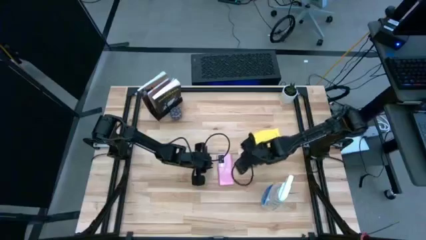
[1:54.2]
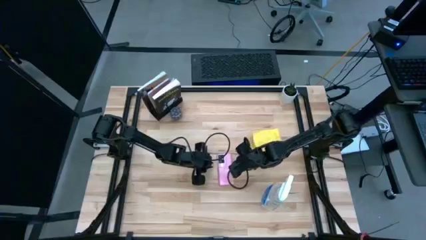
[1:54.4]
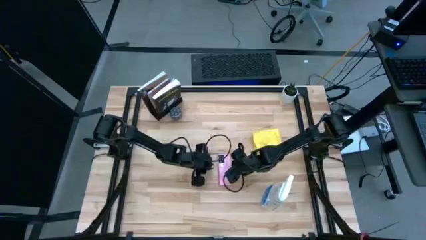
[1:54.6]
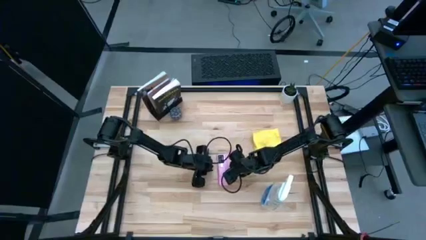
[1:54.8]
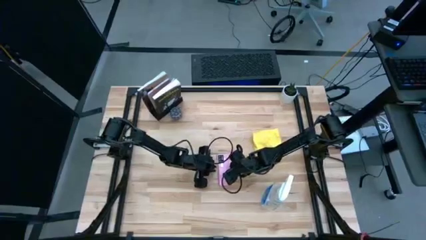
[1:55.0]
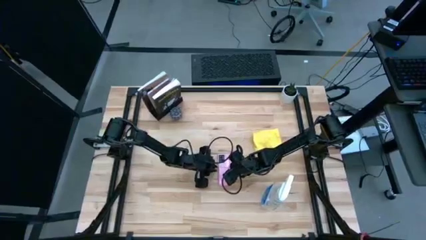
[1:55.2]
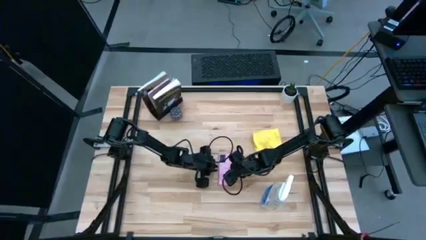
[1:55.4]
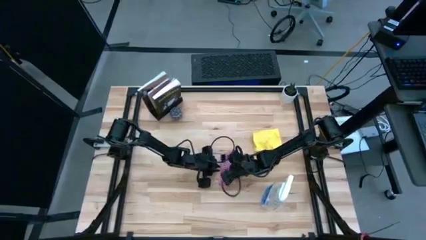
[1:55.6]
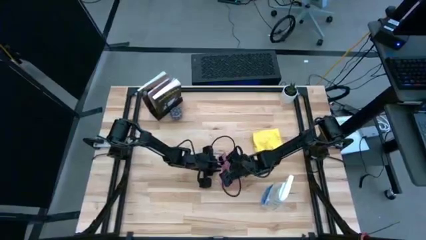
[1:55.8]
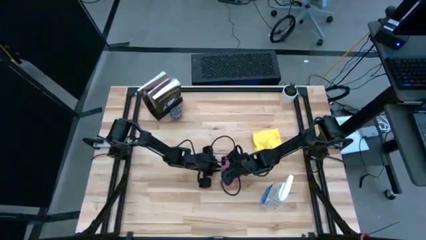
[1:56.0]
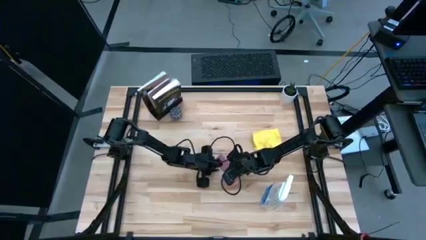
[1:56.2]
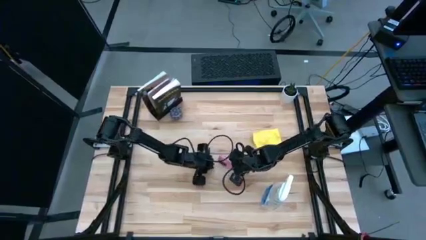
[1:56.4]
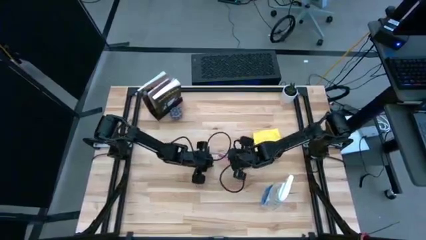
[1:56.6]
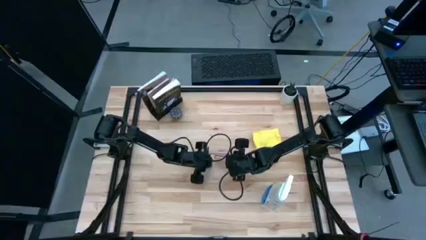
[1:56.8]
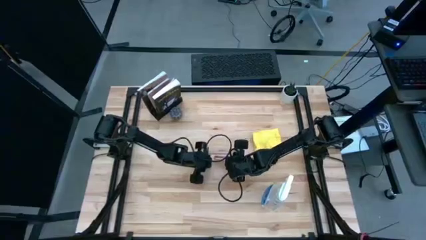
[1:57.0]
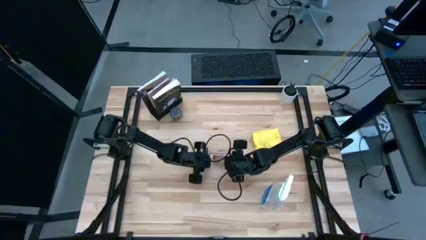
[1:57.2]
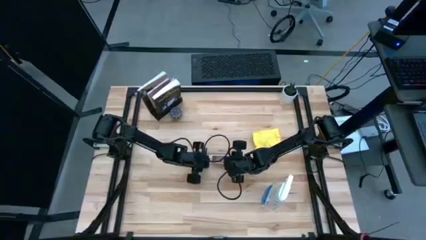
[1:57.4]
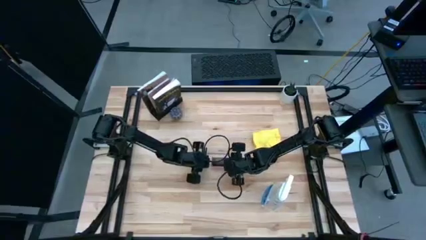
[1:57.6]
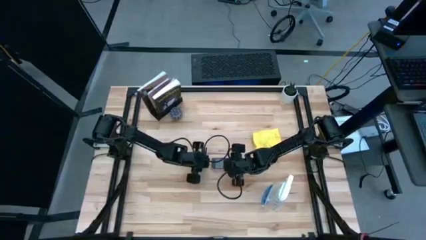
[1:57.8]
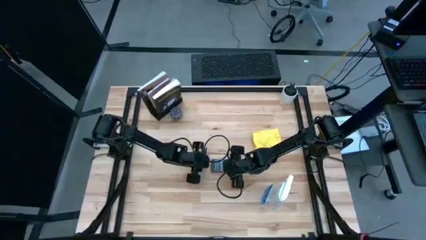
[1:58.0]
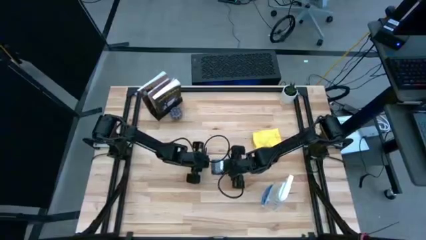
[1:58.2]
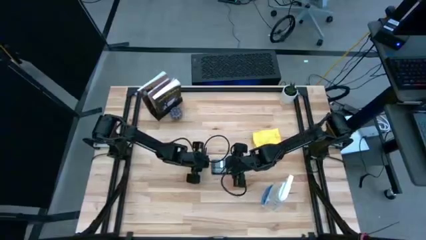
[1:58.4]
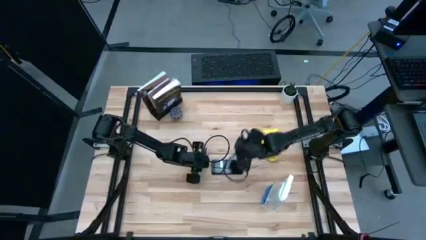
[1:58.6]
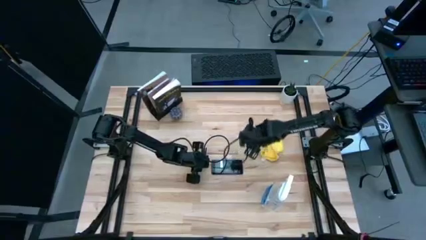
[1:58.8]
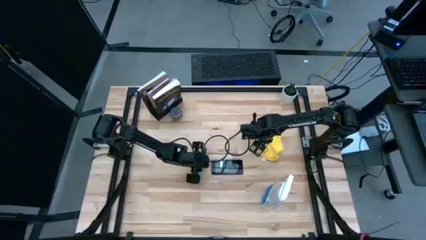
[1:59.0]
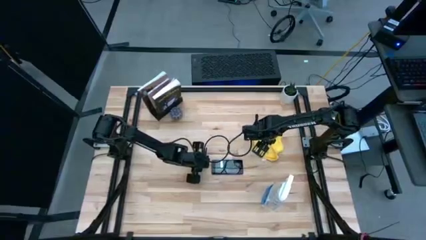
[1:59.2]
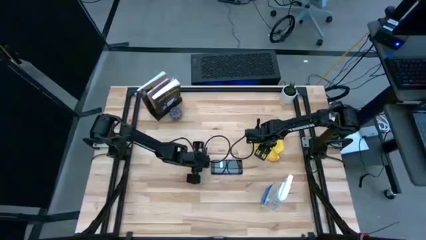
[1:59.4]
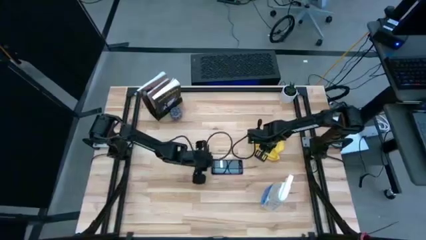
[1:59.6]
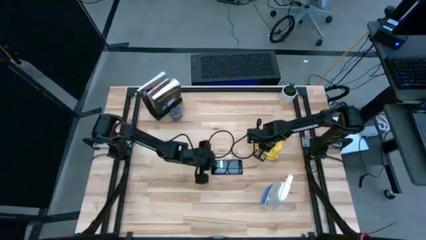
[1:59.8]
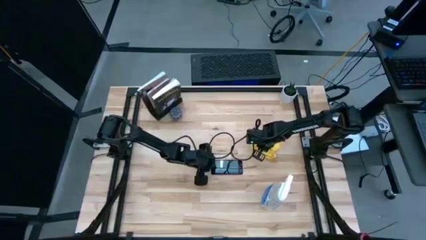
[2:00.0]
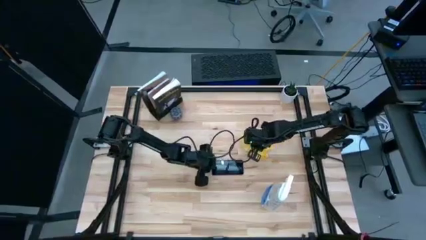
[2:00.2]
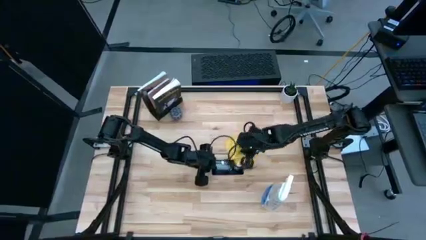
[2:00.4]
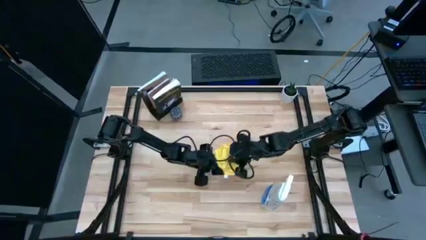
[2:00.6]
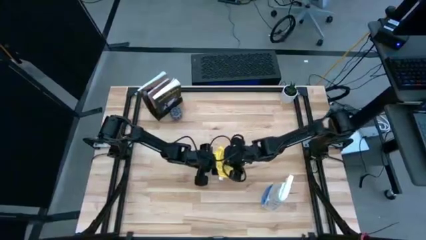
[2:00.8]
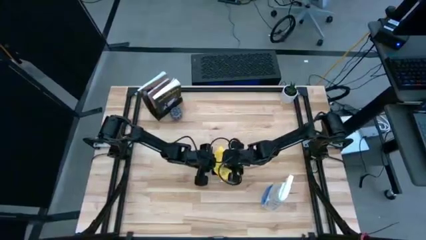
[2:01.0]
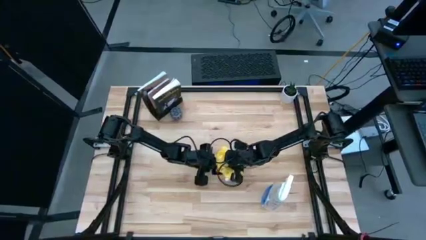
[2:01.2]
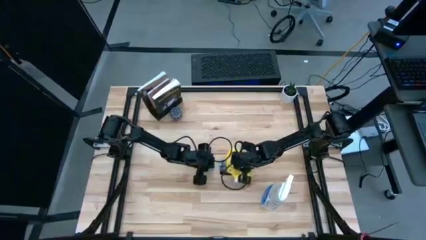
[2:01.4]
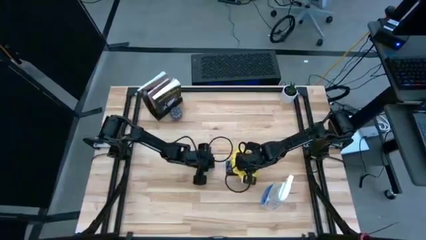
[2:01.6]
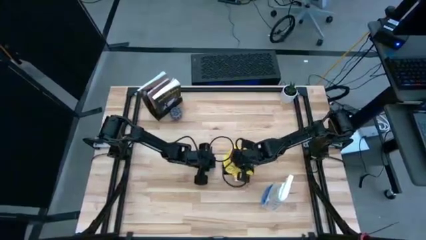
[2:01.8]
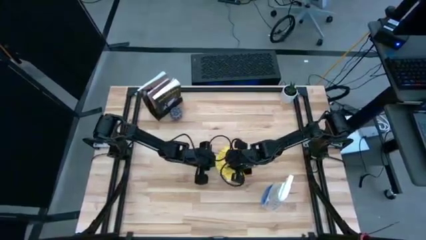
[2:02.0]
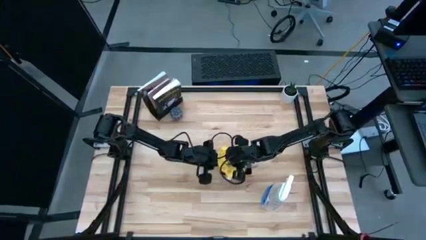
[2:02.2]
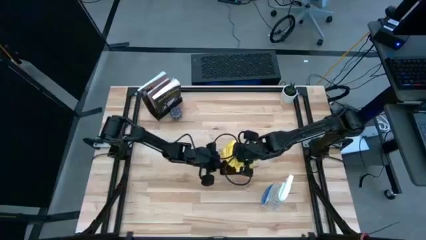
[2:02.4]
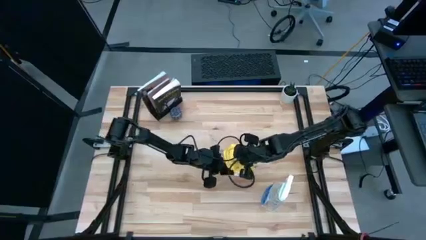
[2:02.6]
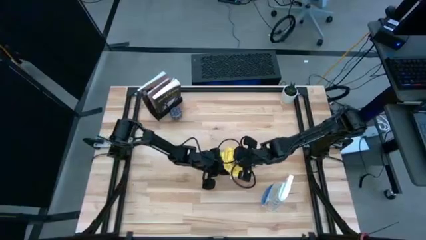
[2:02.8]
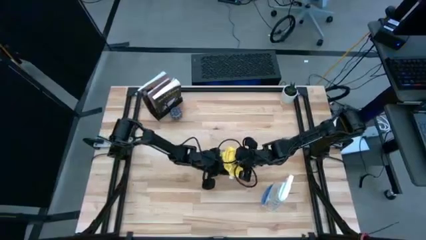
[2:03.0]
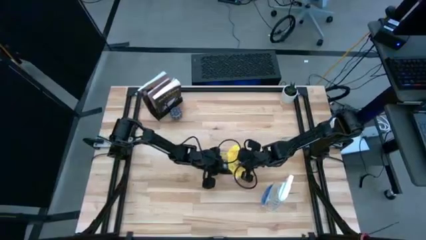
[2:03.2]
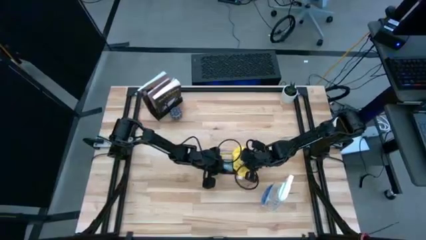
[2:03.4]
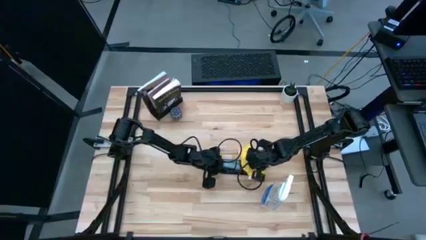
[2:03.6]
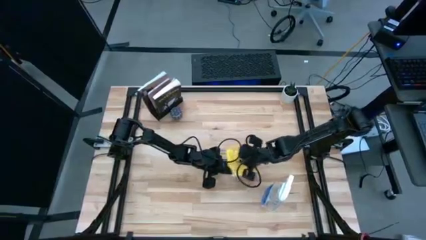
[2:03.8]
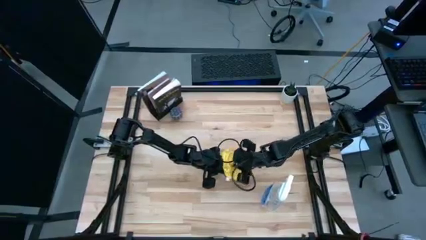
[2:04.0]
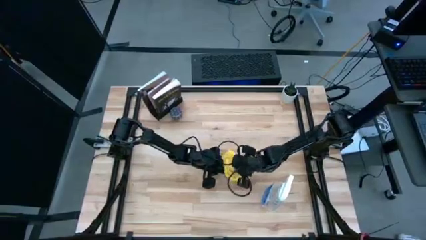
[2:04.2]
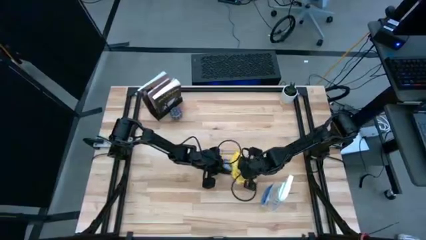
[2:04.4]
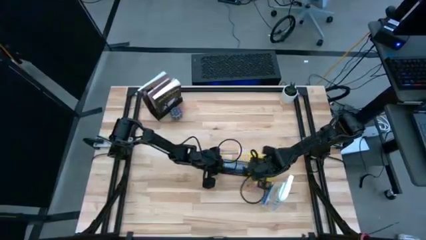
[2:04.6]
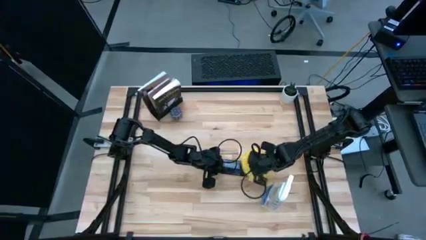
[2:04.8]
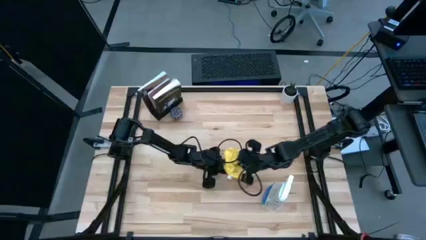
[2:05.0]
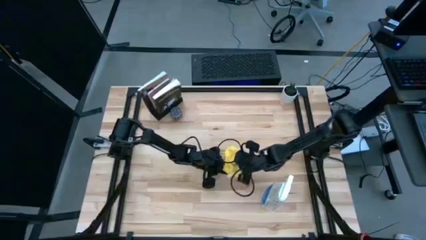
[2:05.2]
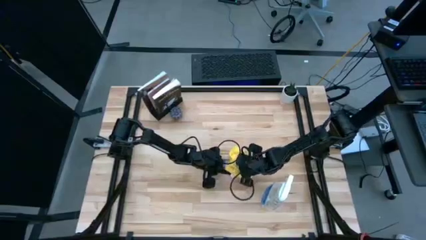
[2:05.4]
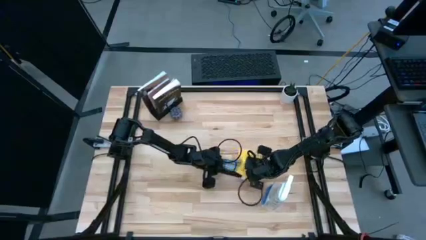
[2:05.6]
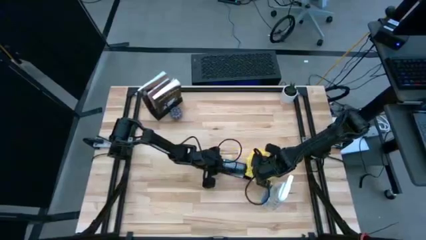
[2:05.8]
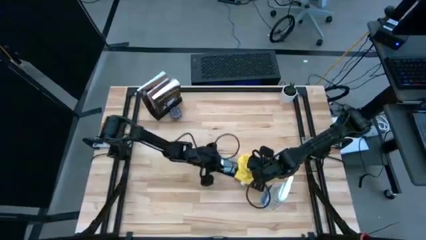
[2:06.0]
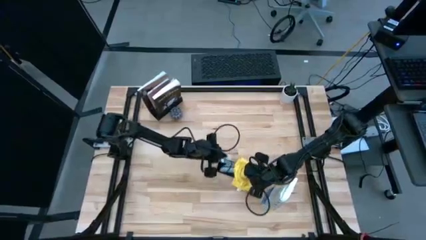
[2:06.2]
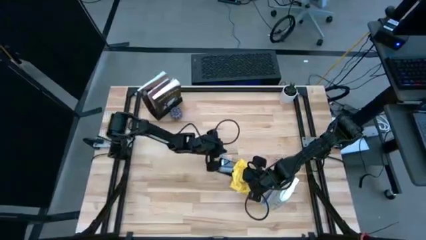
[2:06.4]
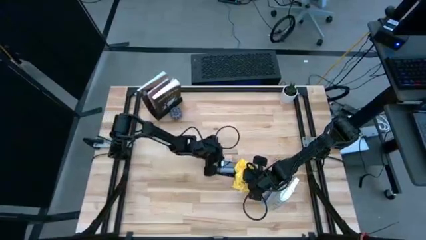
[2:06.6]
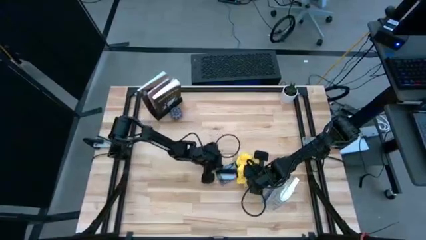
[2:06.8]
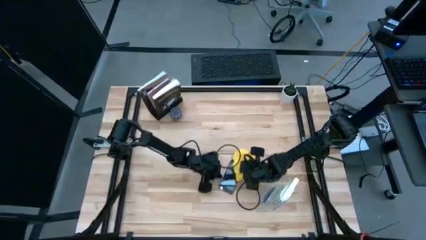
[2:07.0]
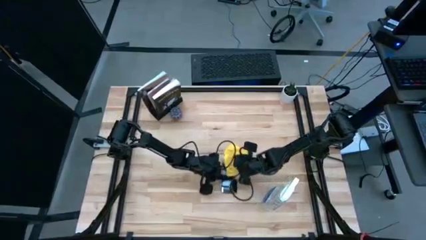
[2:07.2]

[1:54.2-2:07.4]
Task: Apply microfiber cloth
Wipe the front of the pink cellphone with a yellow microfiber cloth

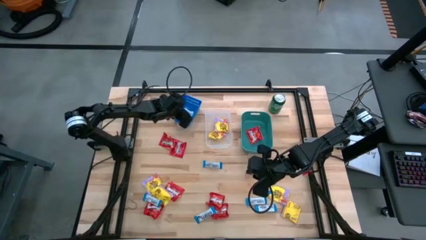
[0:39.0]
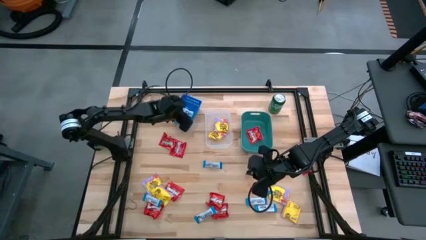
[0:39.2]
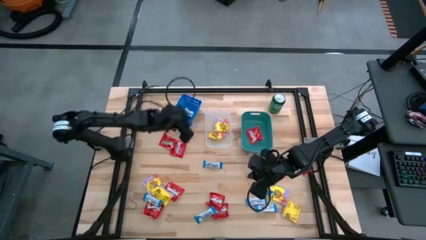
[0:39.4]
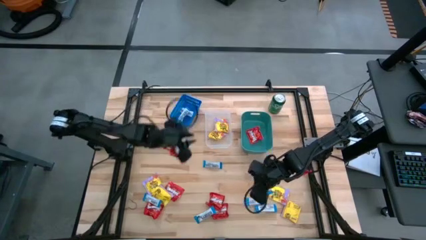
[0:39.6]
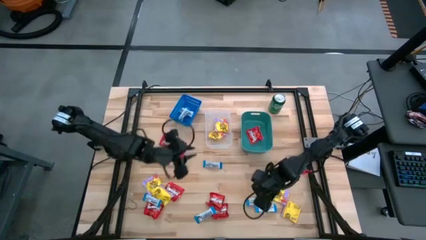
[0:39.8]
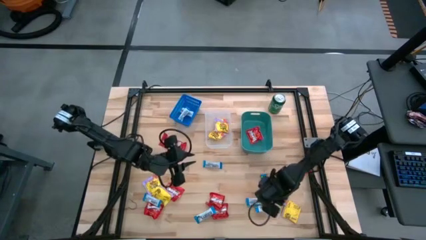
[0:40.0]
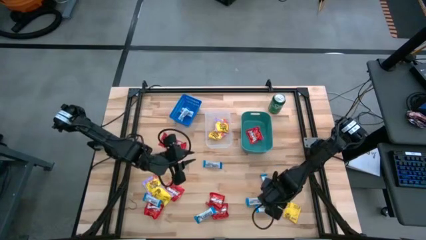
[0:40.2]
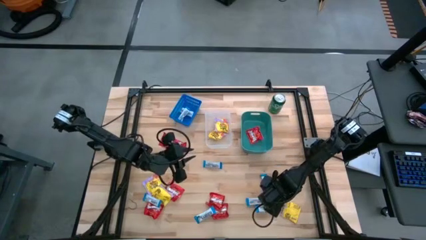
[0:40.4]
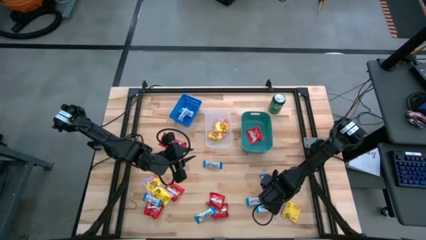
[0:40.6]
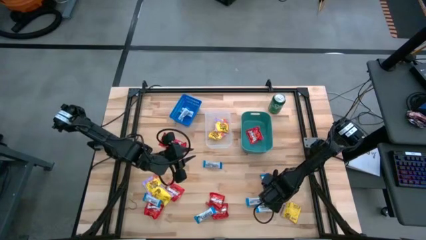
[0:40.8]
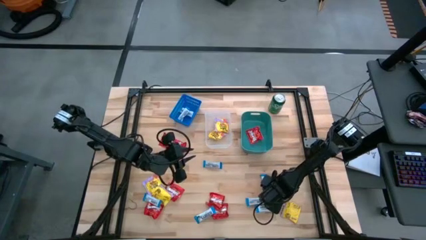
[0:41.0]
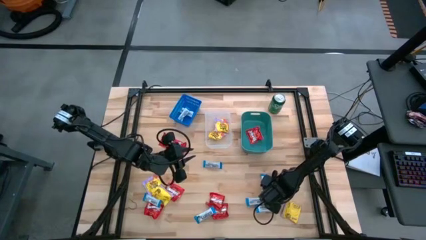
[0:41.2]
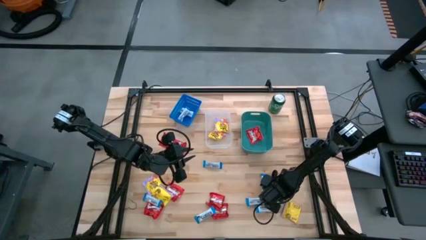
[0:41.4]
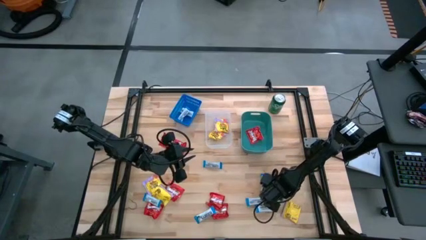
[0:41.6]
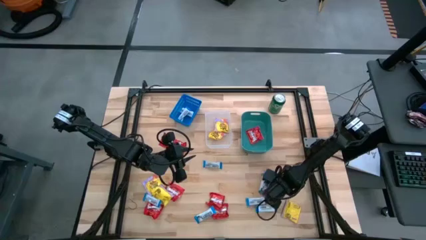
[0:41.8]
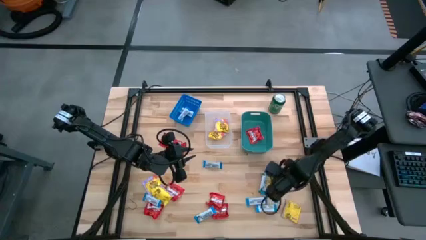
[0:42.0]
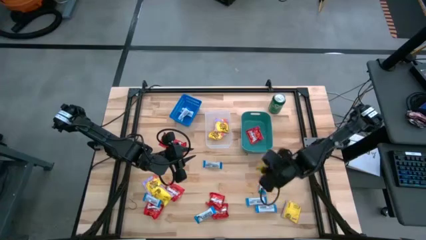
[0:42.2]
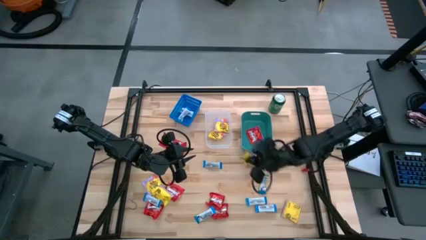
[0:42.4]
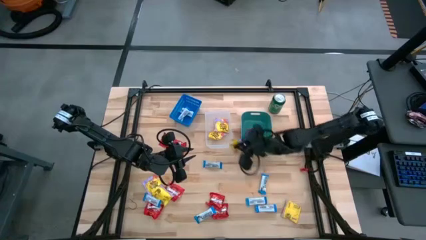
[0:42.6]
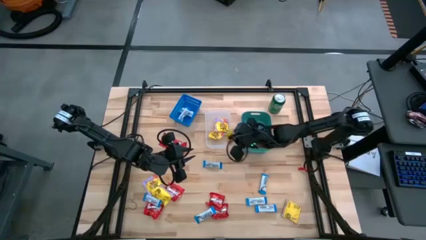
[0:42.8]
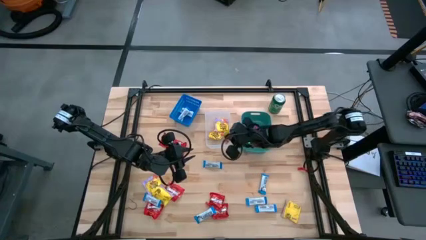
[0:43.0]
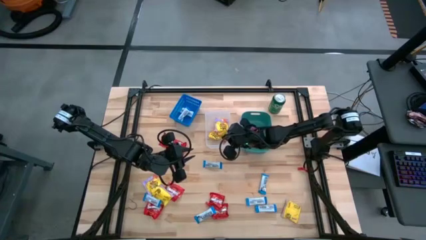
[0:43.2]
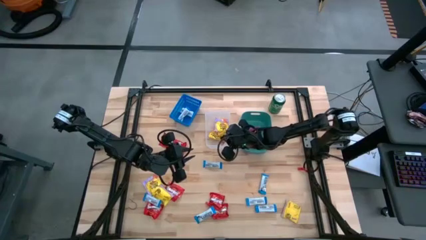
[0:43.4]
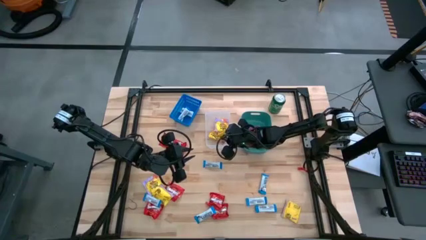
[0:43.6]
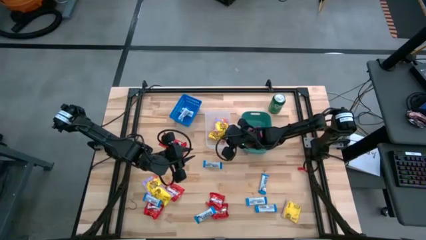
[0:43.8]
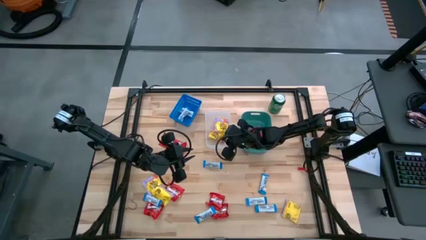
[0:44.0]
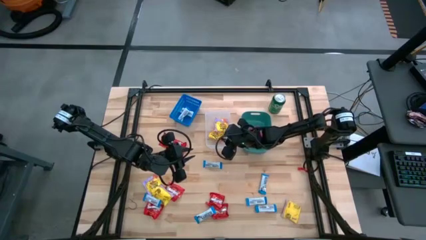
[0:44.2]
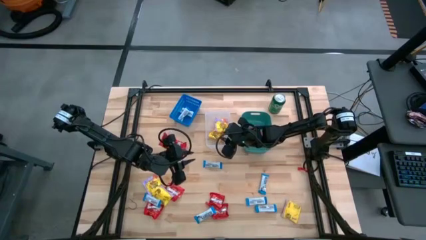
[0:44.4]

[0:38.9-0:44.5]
Task: Sort candy
Put the yellow candy into the transparent bin
